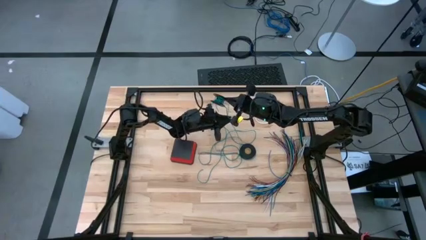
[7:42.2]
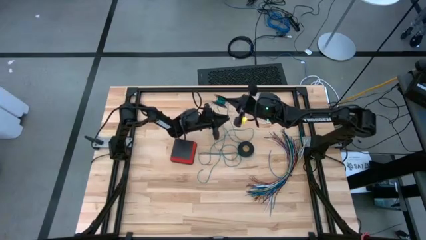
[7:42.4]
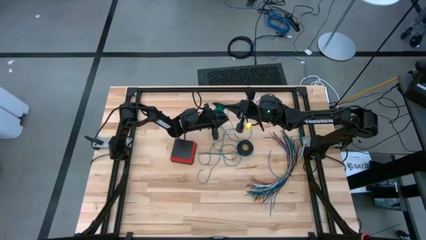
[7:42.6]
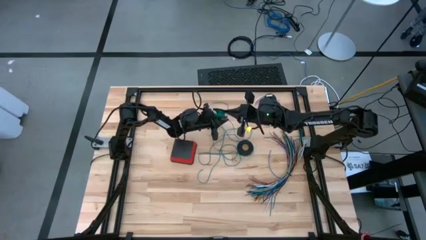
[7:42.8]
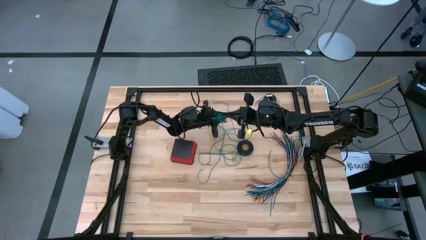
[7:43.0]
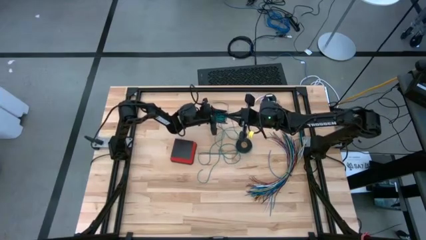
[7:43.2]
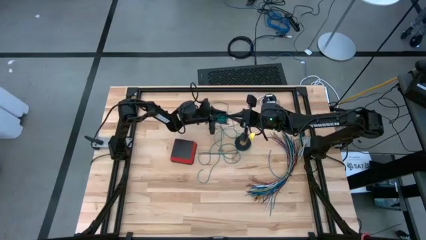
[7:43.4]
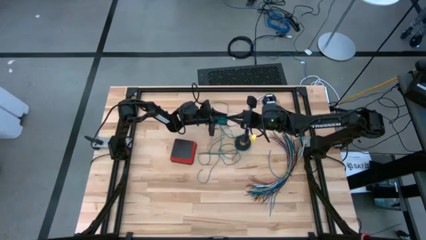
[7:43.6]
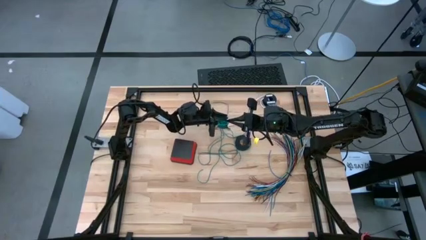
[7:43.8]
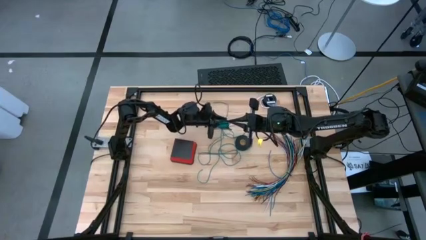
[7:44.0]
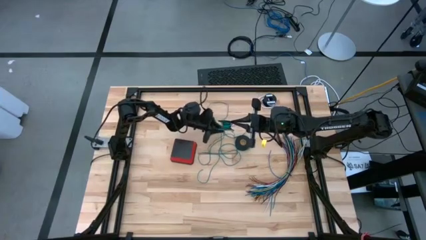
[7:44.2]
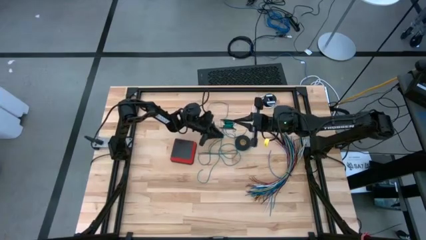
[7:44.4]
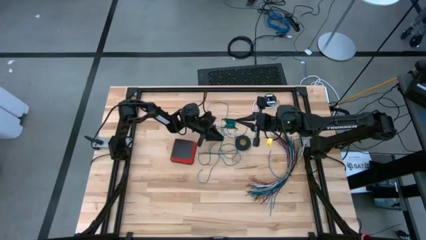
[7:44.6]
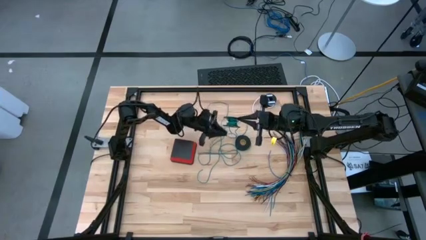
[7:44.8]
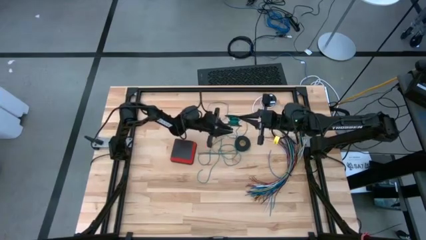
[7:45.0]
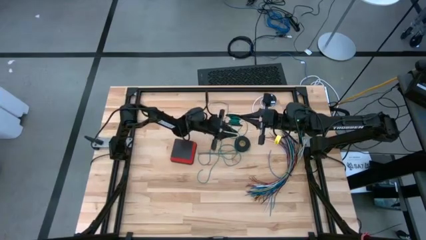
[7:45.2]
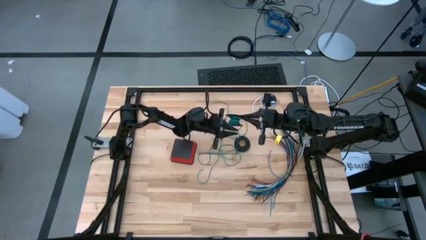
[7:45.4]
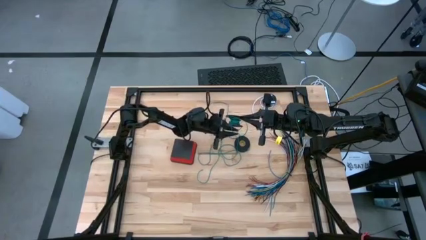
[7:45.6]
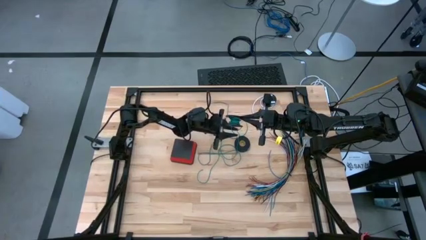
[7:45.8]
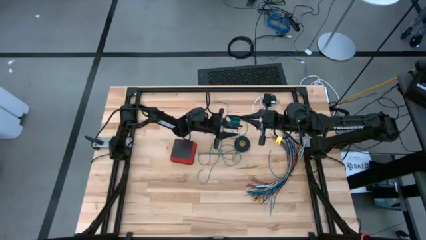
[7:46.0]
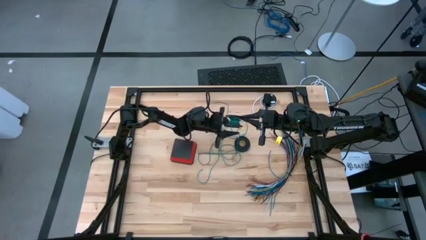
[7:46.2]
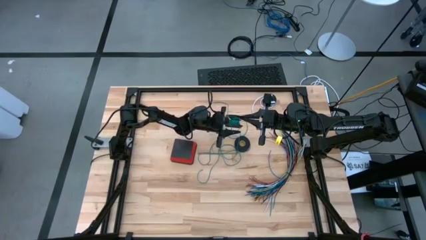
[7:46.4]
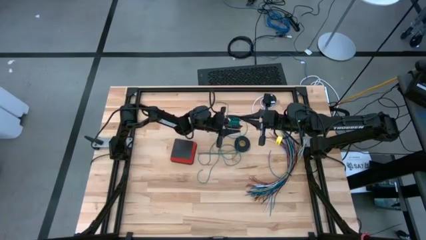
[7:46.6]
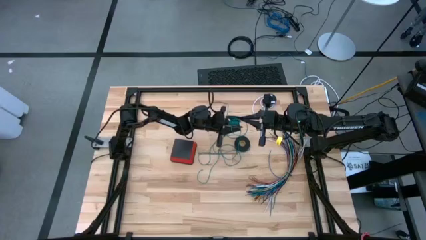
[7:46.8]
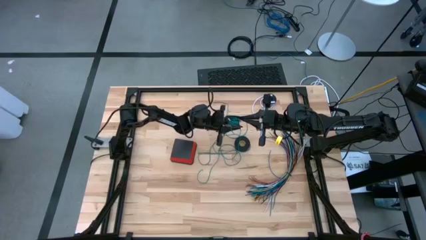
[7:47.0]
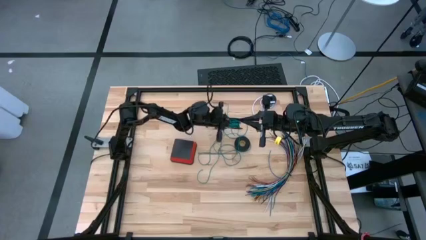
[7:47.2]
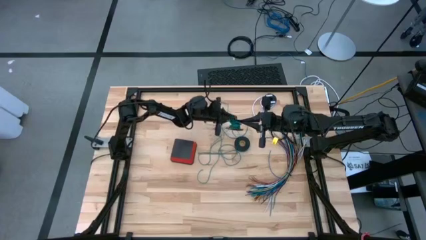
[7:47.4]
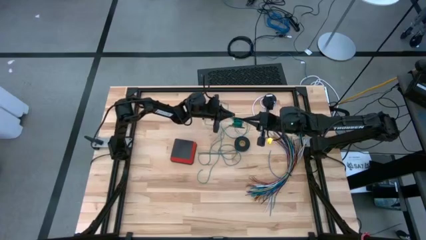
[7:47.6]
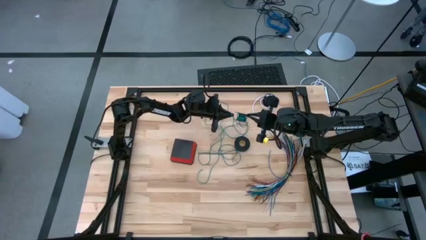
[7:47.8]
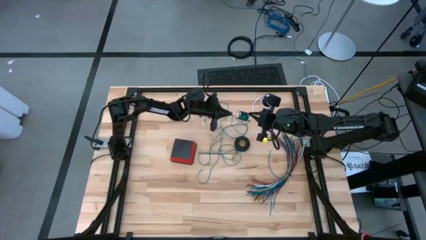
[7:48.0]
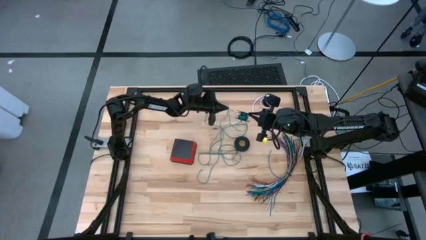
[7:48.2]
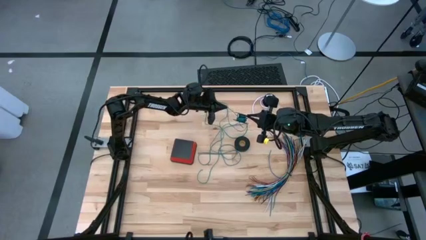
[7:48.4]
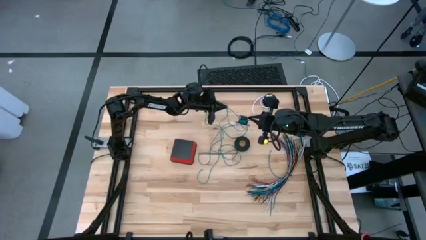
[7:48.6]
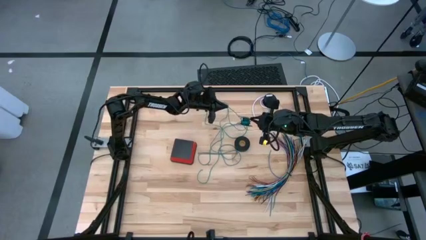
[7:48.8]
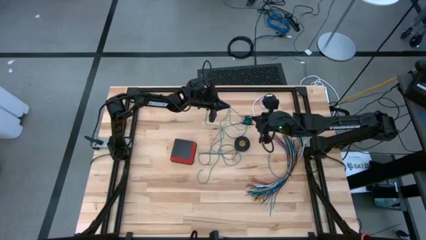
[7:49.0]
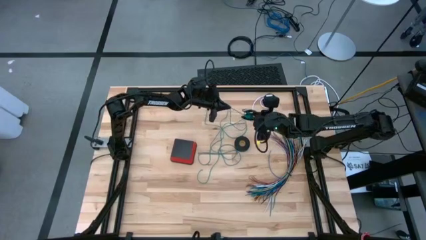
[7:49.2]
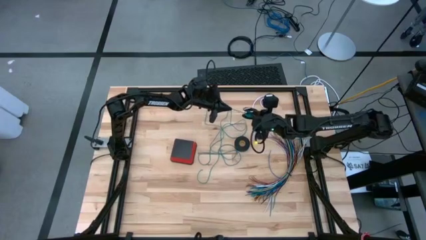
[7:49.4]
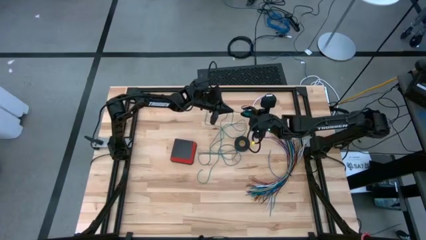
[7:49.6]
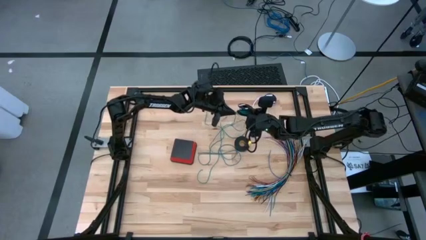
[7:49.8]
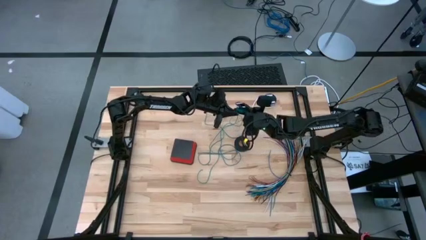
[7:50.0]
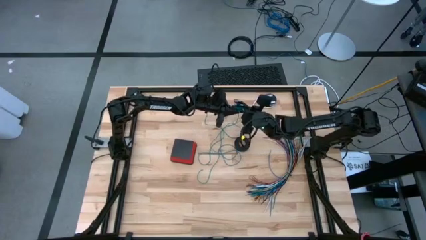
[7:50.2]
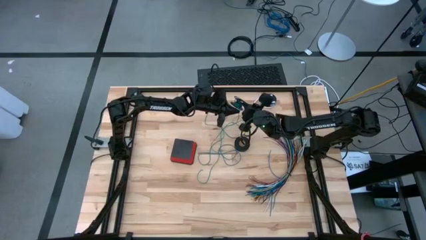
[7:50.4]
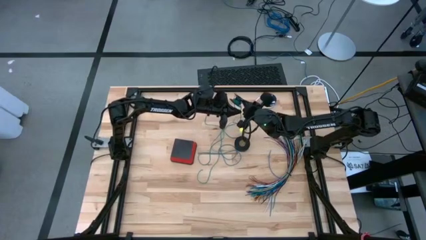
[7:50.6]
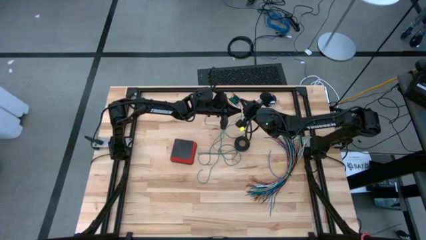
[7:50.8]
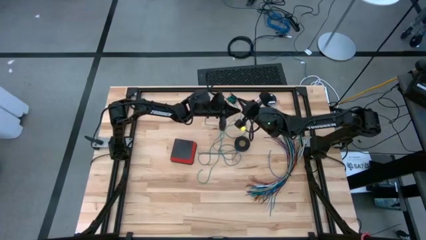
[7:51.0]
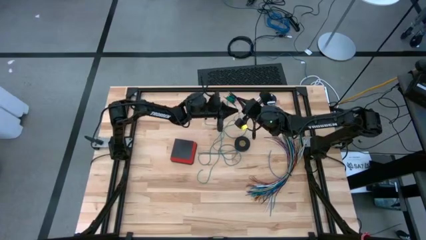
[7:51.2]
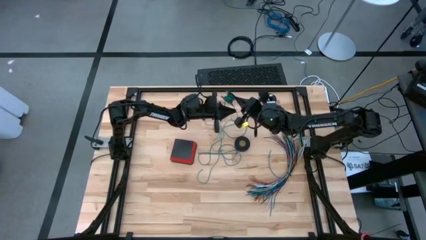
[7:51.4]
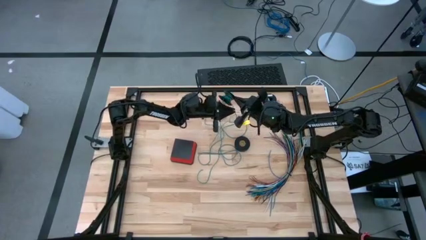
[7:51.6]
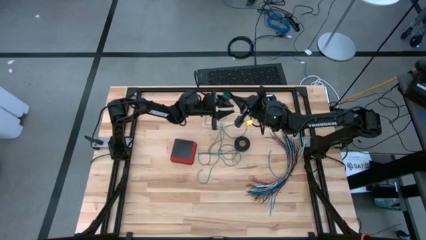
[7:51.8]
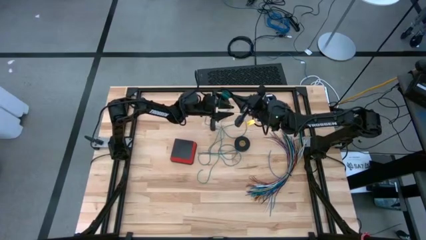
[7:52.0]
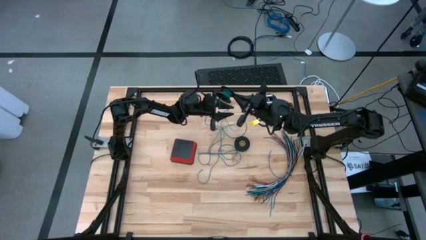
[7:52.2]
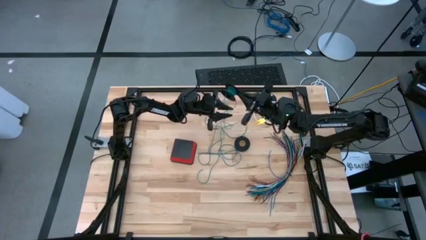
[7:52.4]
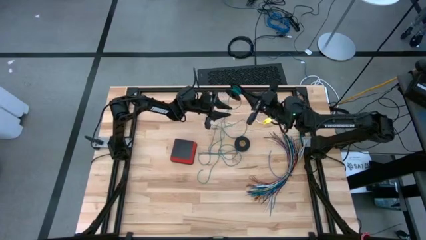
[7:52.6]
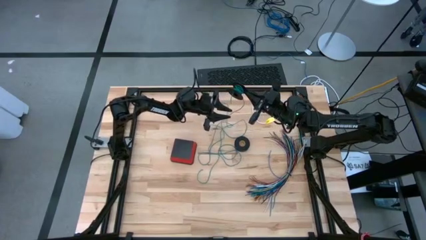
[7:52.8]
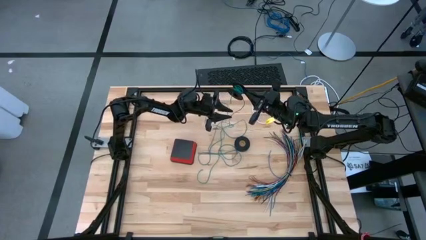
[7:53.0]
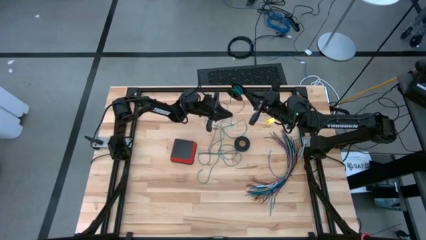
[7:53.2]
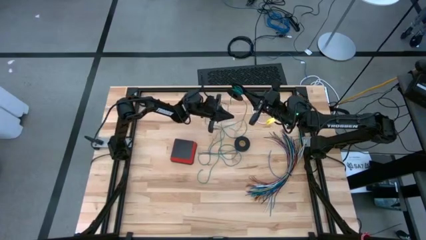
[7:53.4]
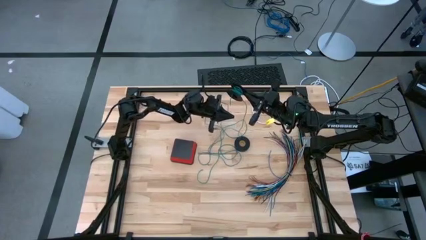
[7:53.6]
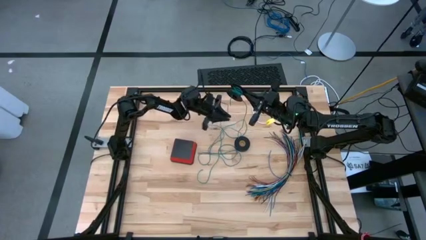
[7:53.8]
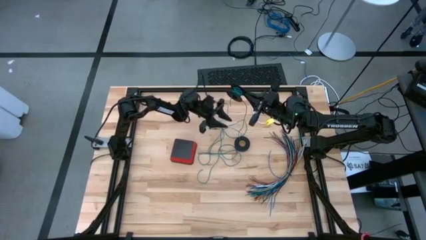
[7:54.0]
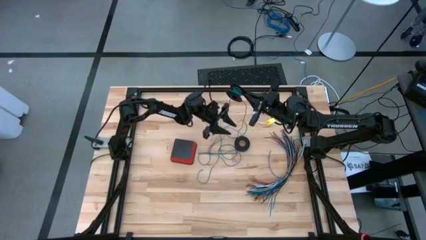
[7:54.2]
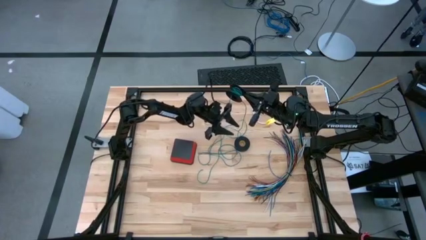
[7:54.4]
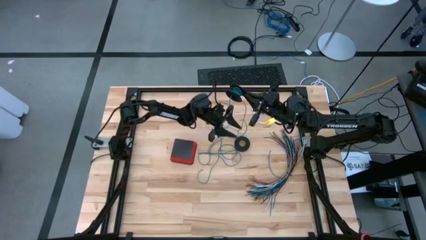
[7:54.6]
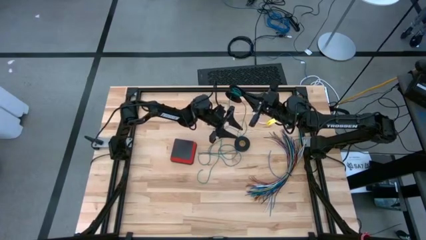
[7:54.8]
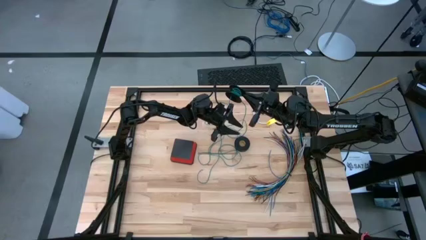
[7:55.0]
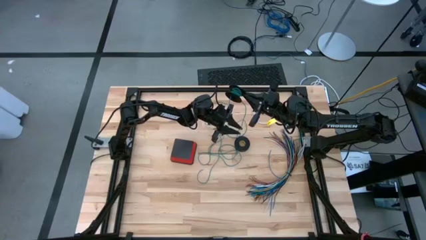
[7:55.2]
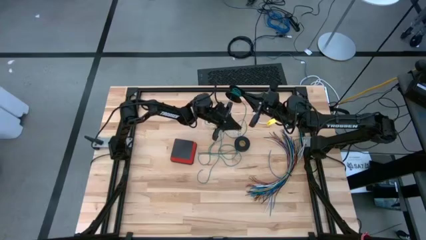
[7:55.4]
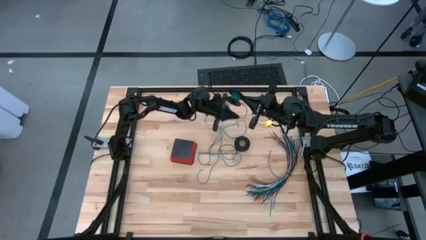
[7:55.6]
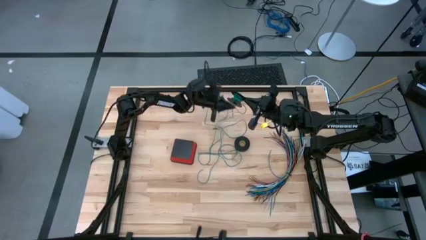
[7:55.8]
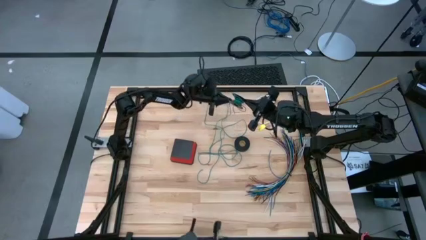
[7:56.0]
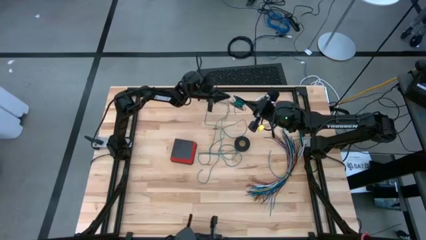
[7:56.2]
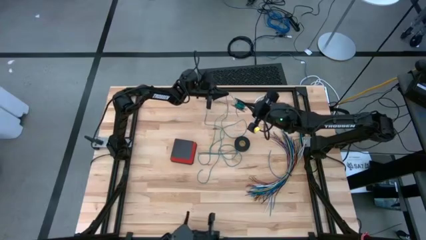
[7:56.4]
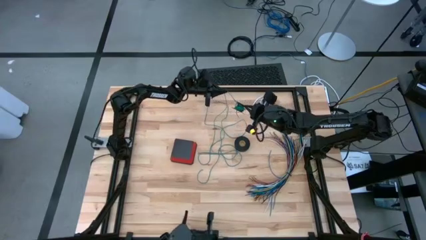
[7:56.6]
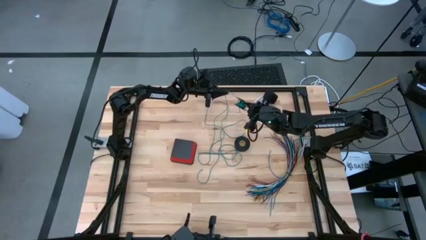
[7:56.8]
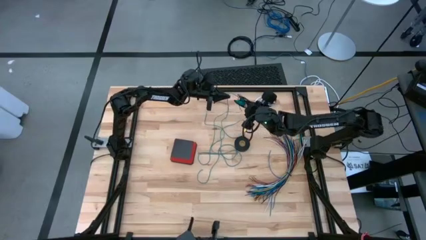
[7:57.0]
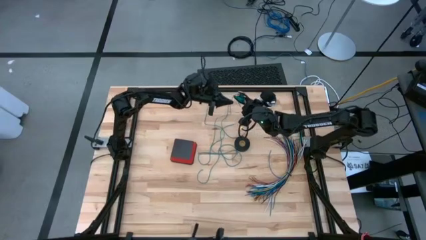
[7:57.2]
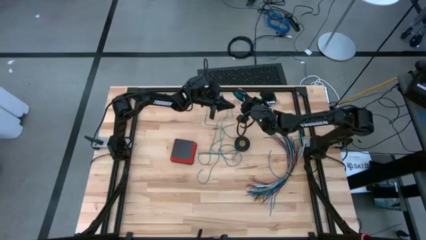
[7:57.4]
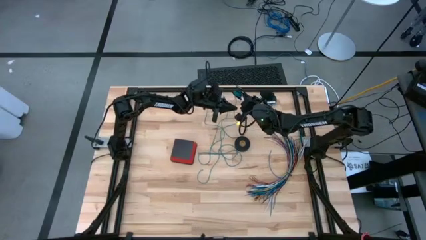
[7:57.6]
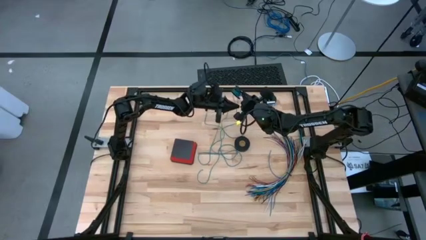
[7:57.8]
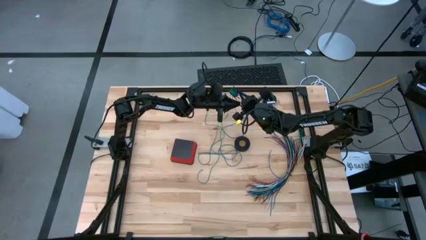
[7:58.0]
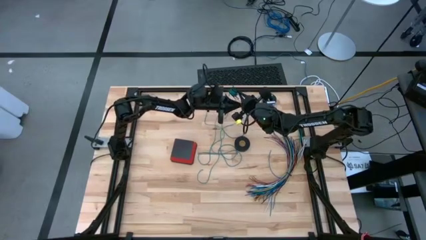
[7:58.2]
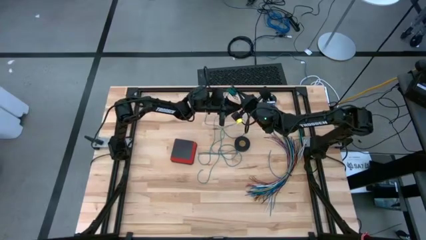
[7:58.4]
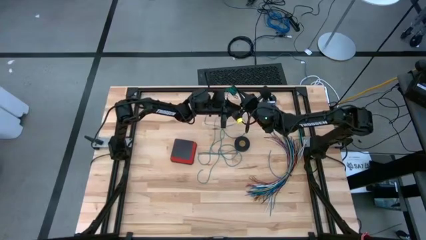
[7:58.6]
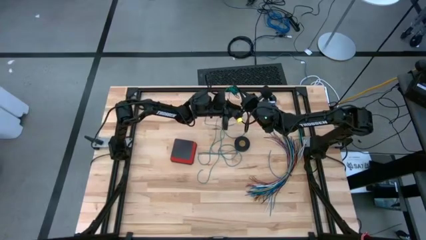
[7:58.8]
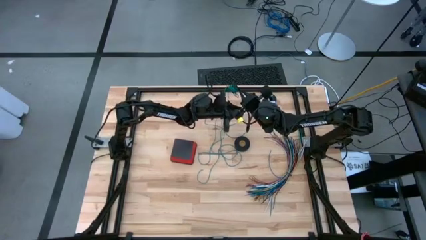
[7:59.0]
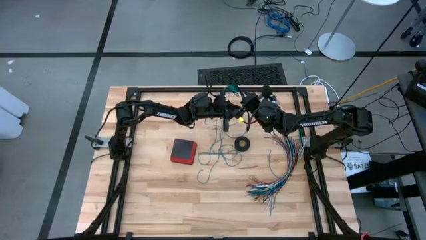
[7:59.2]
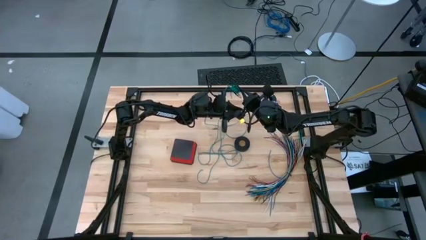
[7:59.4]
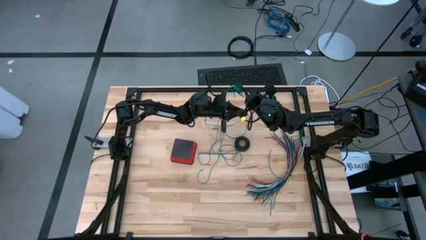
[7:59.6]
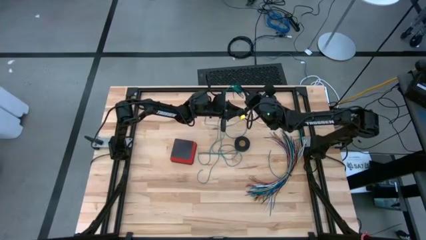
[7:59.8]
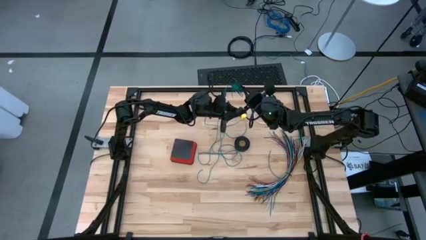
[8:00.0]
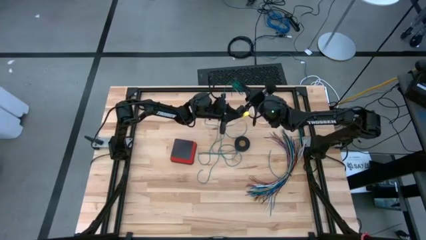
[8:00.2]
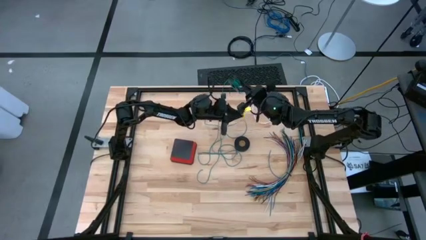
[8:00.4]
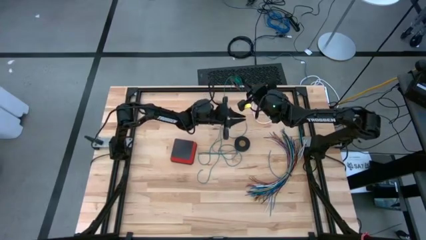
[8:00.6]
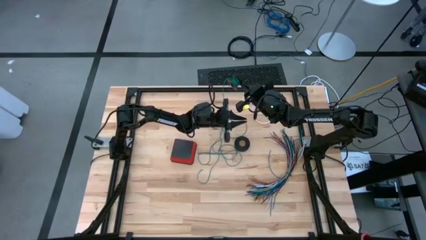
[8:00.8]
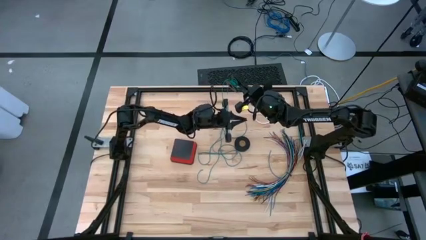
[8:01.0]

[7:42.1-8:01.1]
Task: Coiling cords
Coil the green wire cable on the spool
